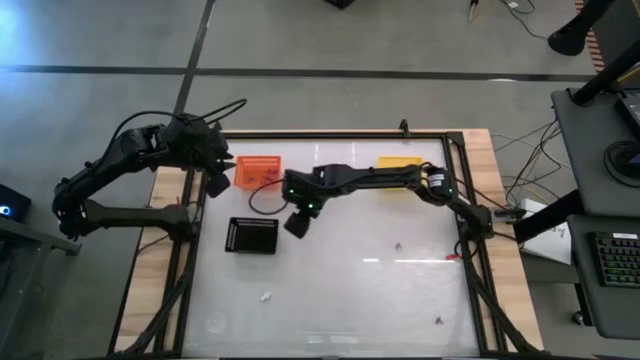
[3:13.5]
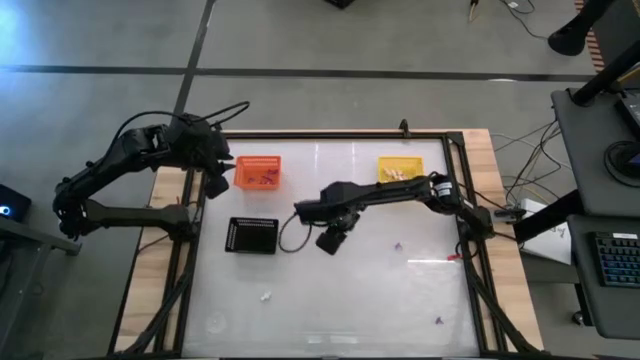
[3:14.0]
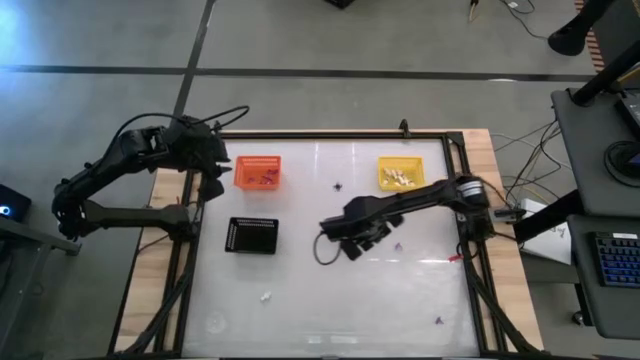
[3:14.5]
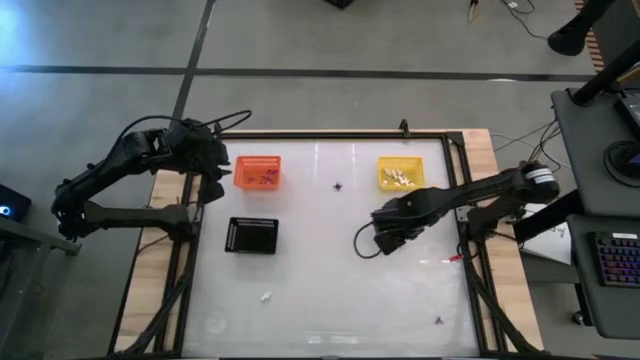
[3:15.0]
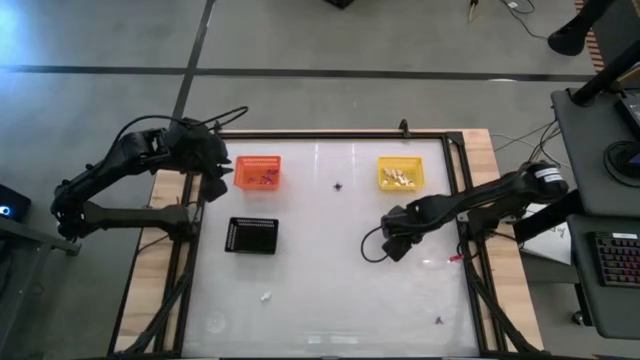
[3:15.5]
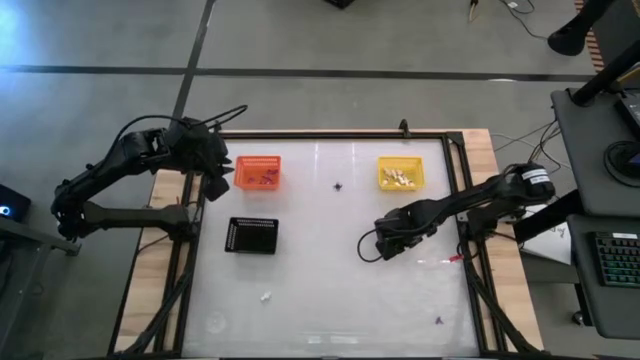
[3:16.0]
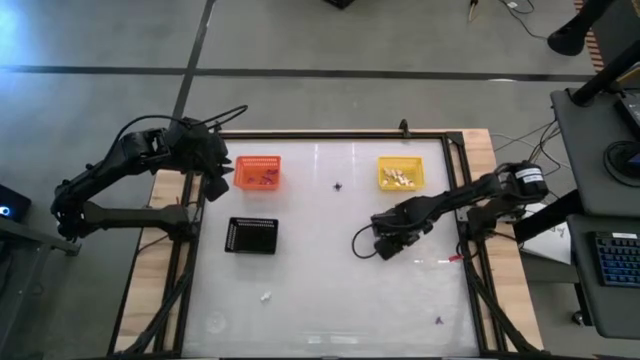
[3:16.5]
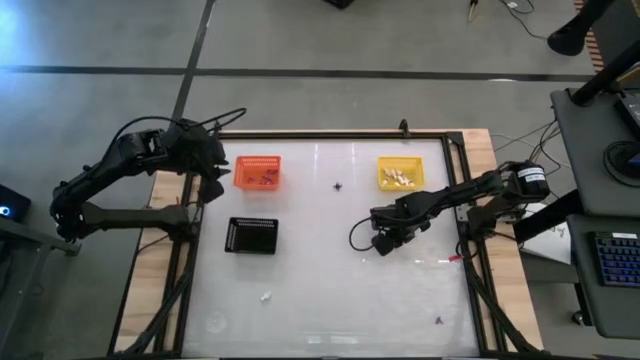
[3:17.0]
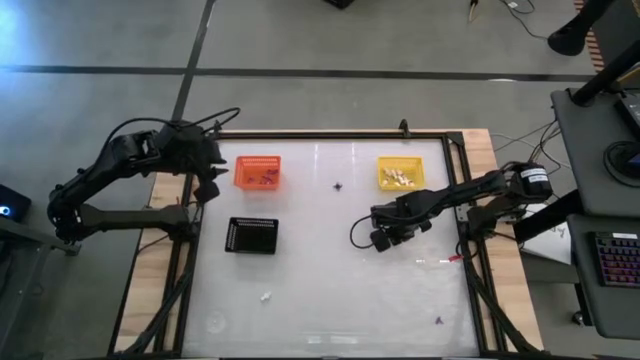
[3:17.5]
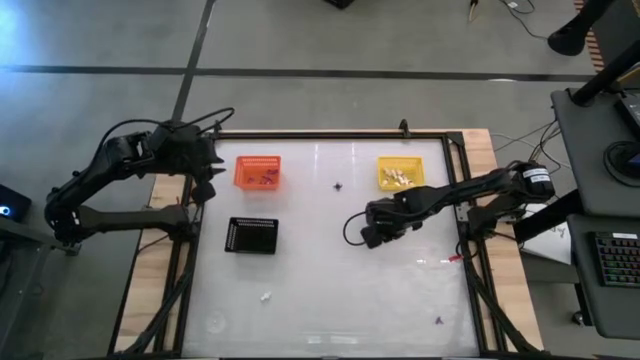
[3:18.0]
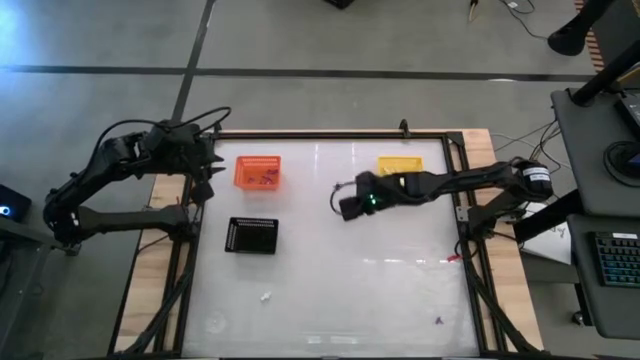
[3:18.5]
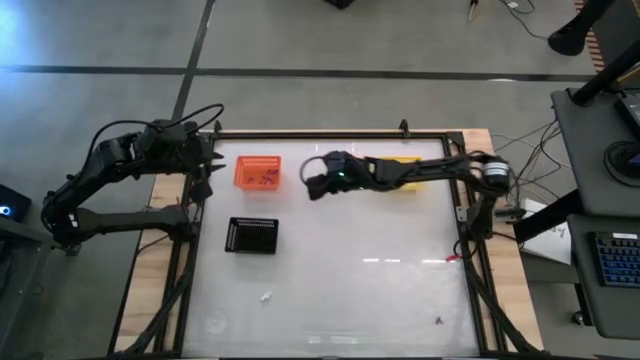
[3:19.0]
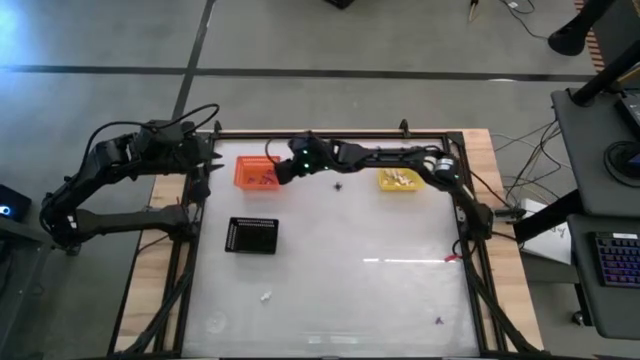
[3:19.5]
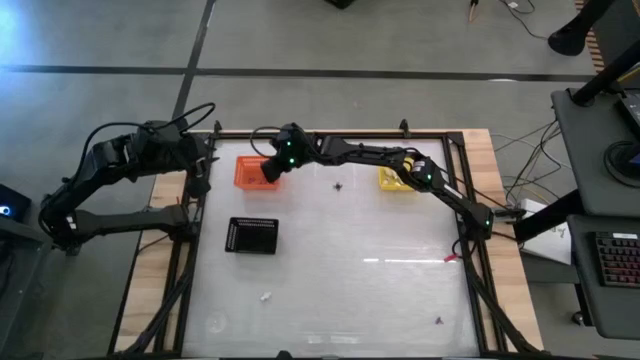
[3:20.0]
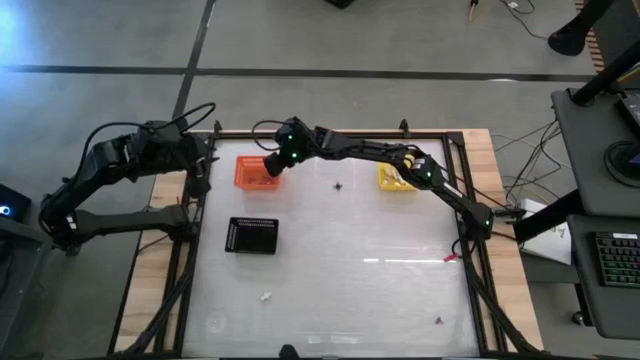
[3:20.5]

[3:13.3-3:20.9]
Task: Sort Halloween decoration
Put the violet witch hat toy into the orange bin

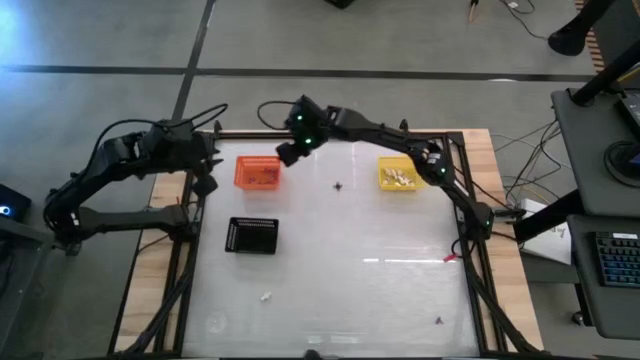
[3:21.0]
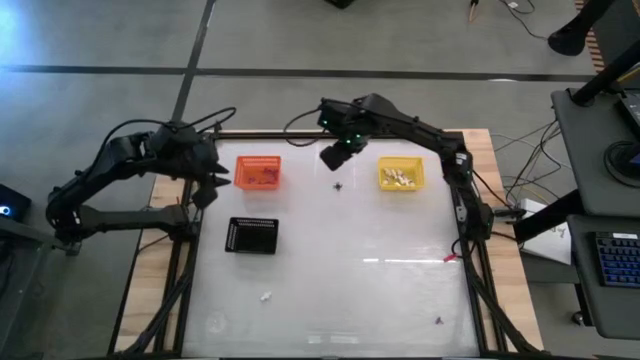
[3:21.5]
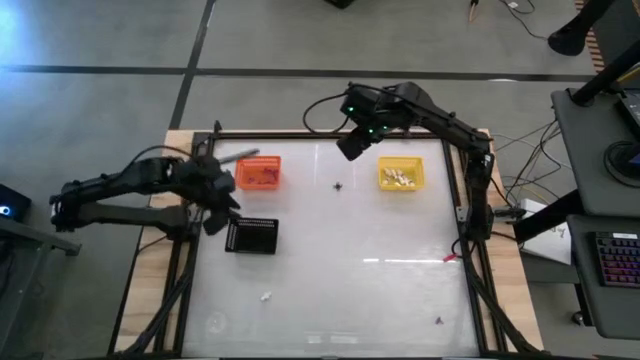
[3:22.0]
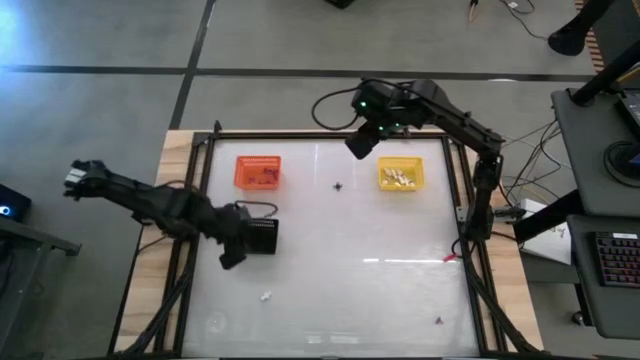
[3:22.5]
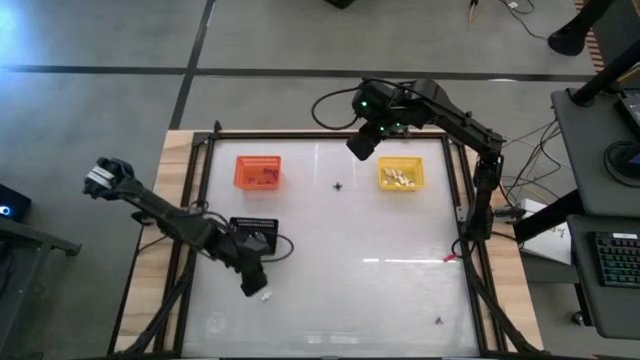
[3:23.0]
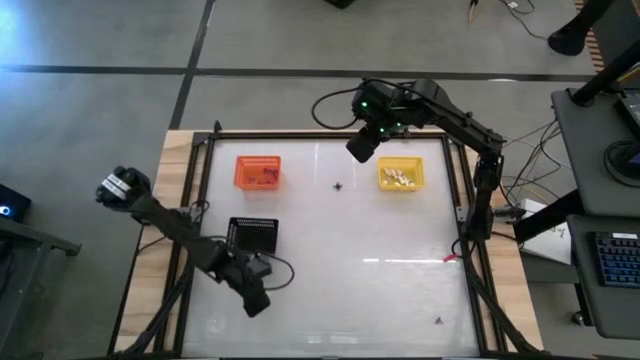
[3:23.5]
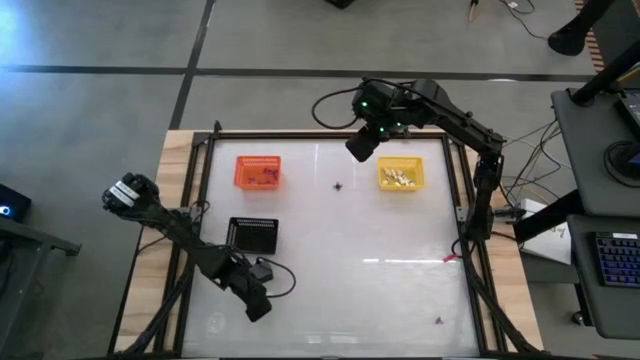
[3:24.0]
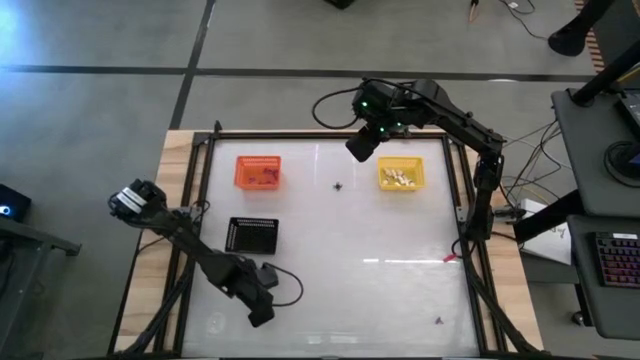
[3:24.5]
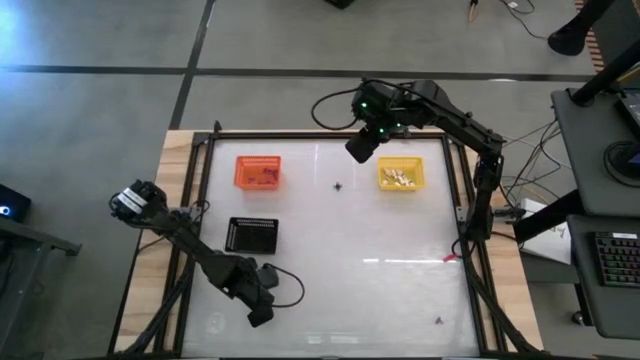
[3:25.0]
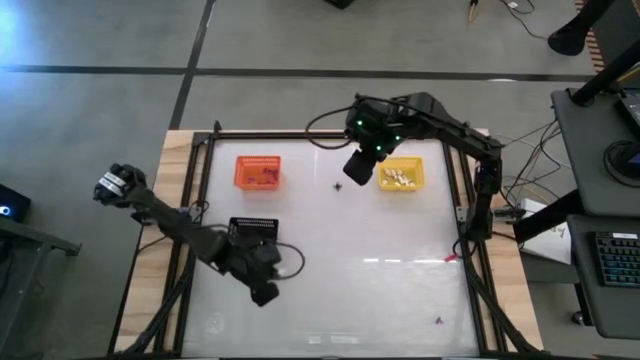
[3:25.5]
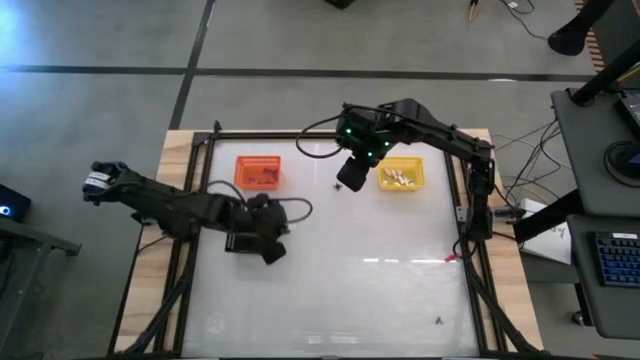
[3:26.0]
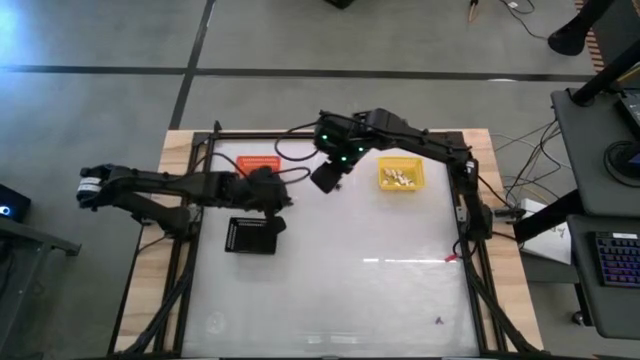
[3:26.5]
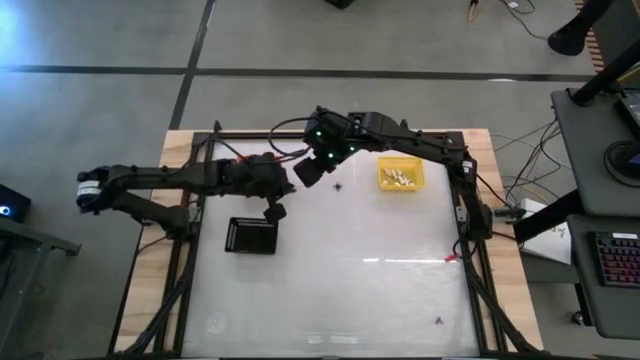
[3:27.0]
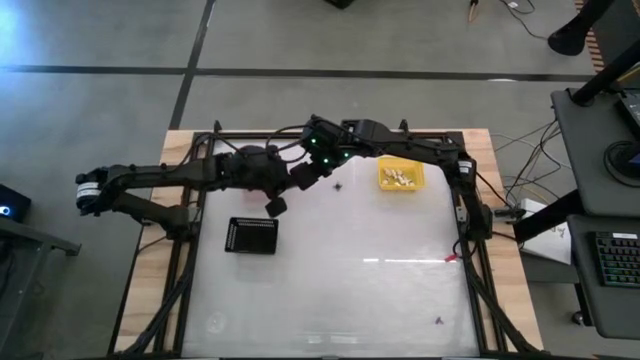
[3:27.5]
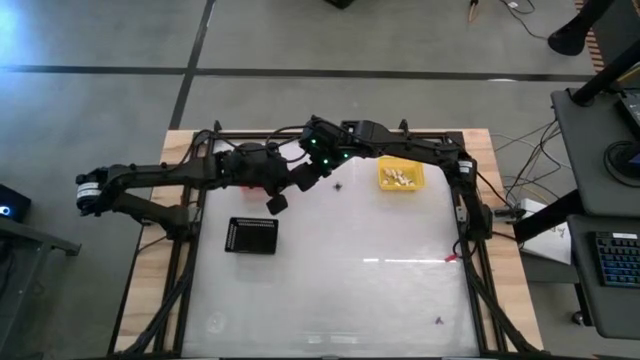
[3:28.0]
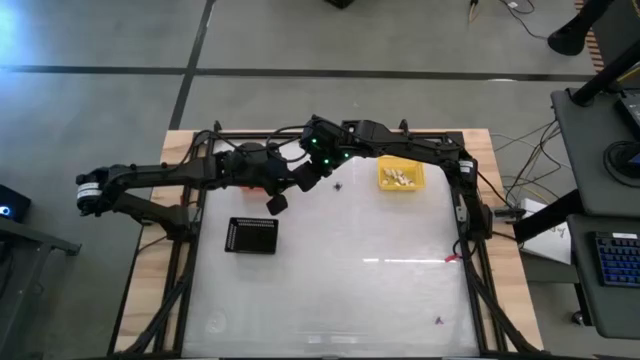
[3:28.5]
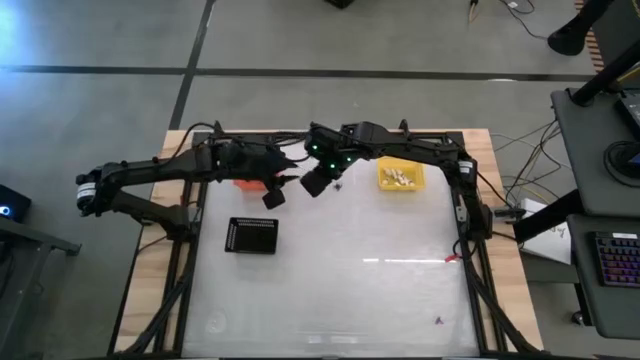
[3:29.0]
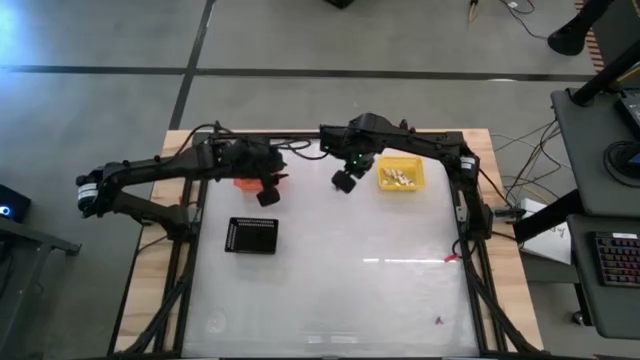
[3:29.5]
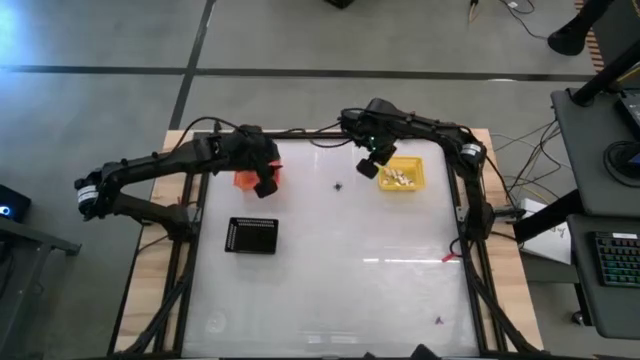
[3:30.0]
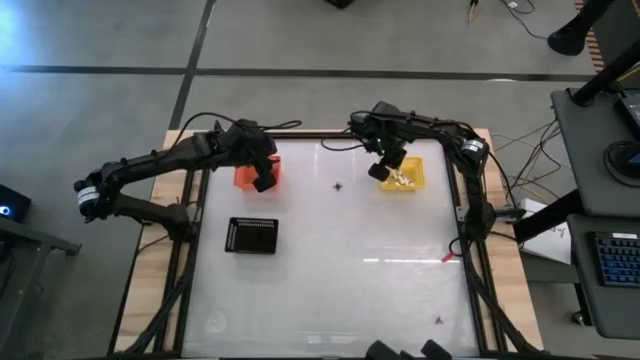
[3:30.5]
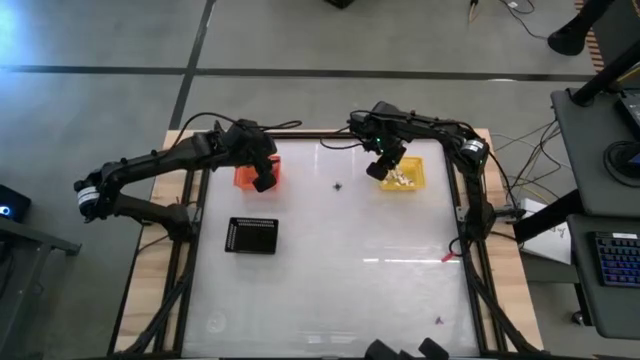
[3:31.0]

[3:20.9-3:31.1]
Put the white skeleton toy into the yellow bin

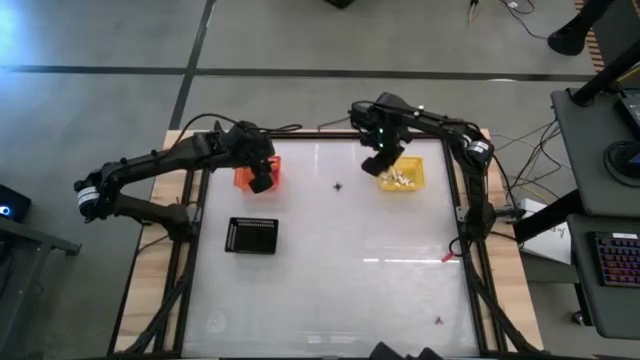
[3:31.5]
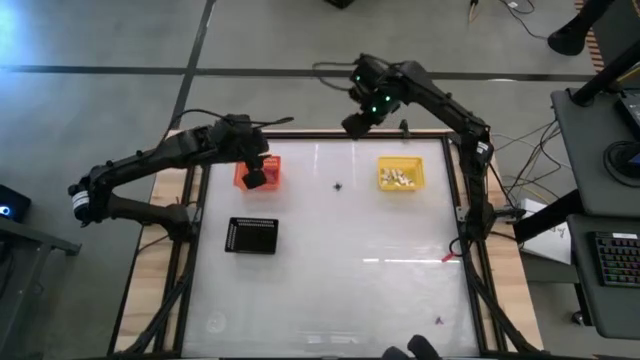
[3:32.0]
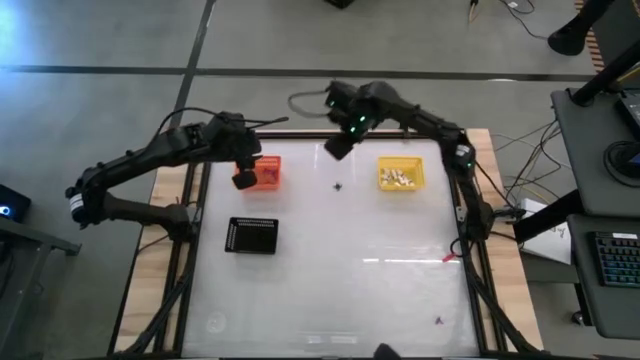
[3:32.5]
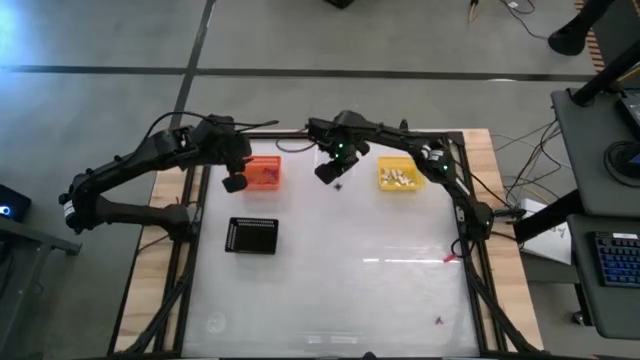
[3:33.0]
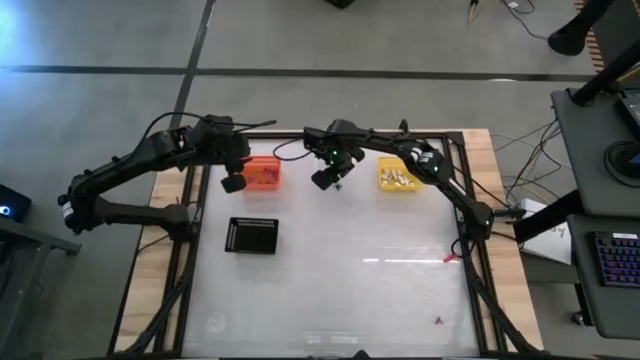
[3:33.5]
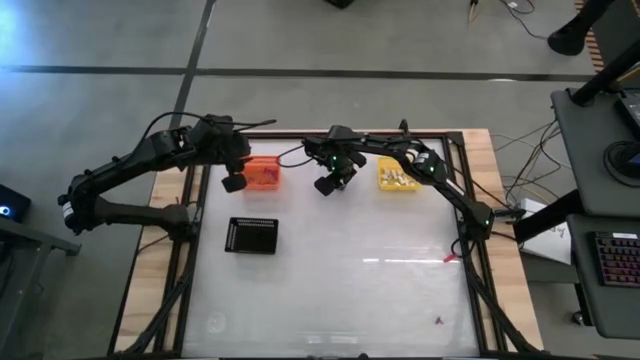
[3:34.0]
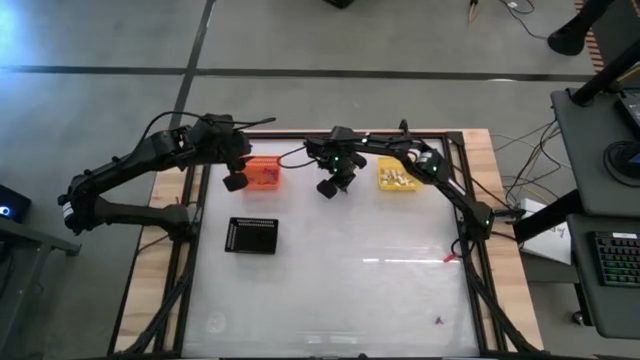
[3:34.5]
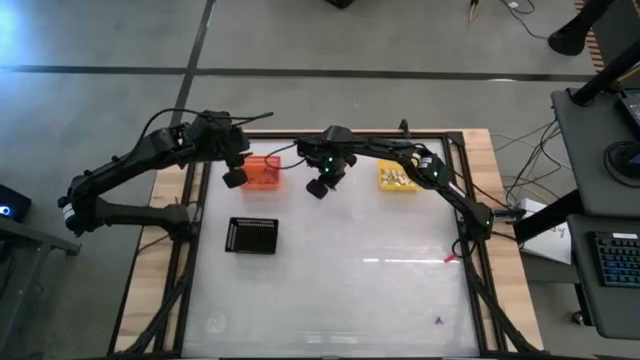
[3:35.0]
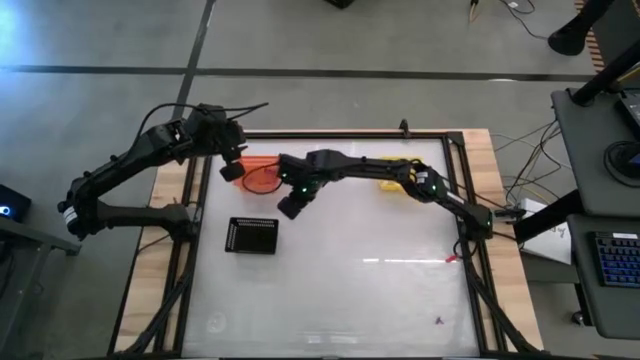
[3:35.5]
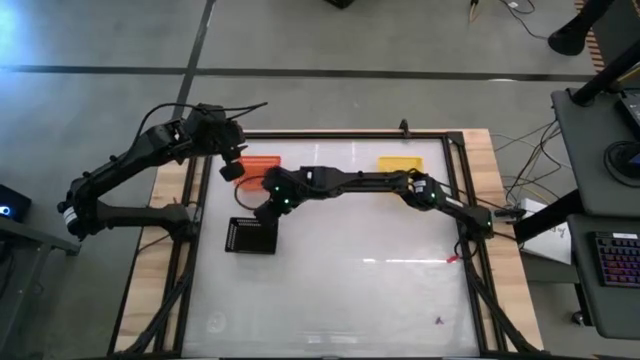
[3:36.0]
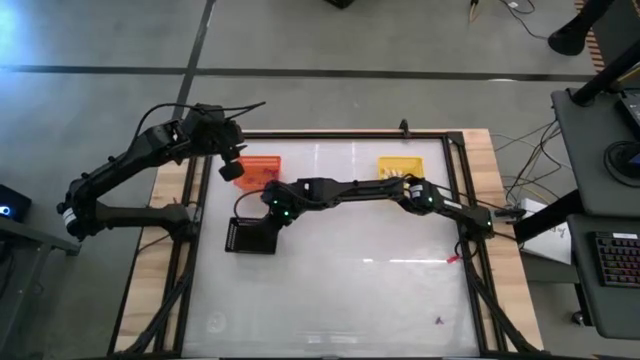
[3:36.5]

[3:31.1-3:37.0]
Put the black spider toy into the black bin
